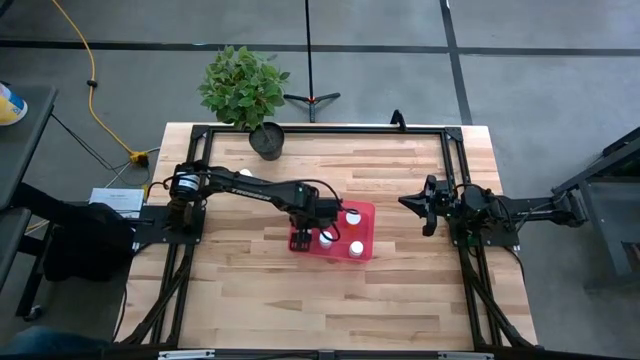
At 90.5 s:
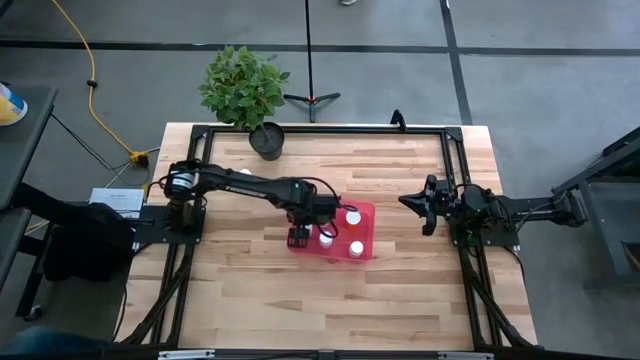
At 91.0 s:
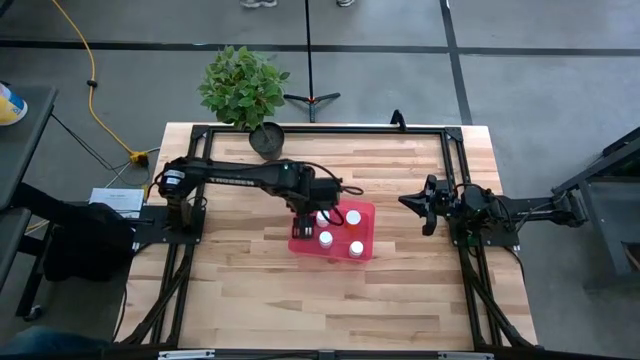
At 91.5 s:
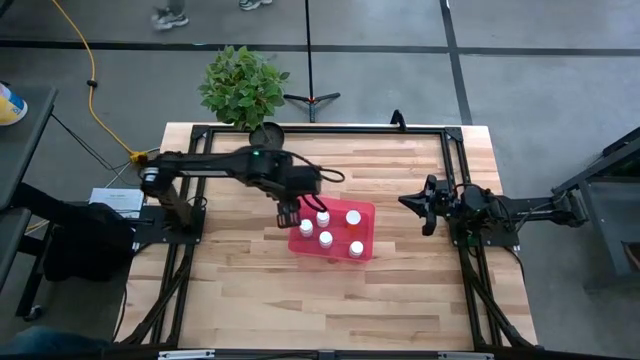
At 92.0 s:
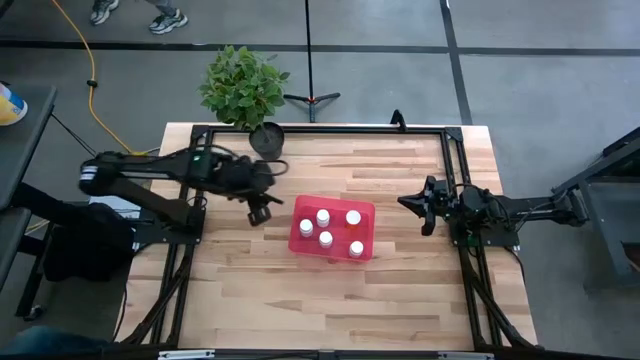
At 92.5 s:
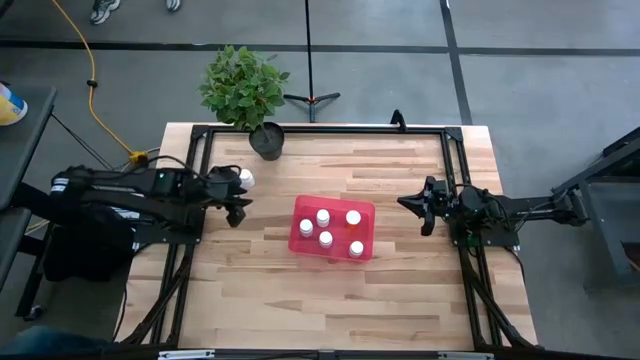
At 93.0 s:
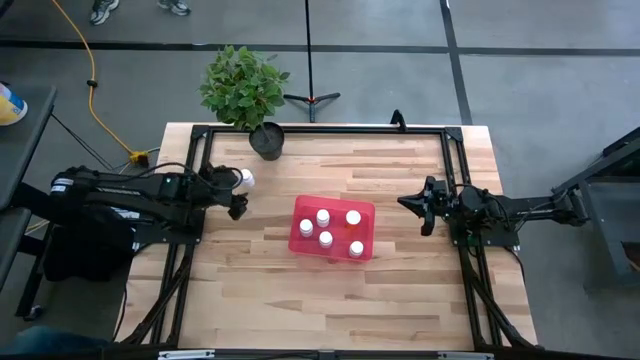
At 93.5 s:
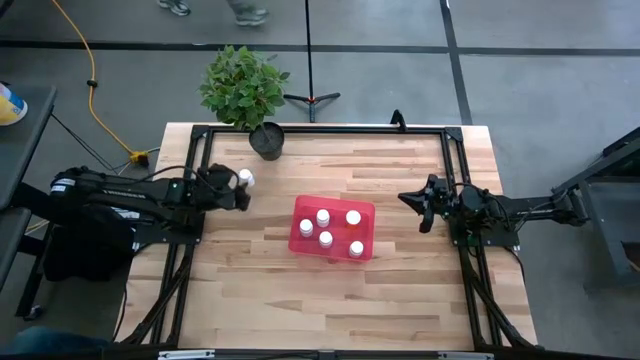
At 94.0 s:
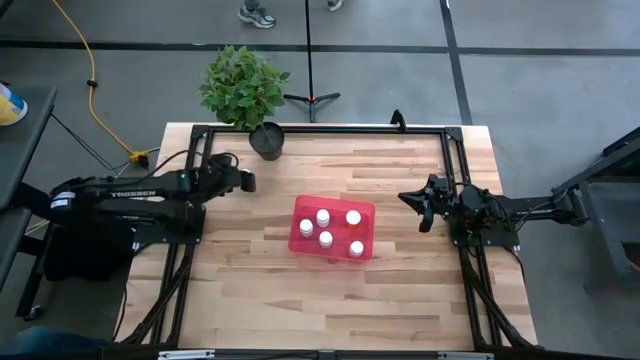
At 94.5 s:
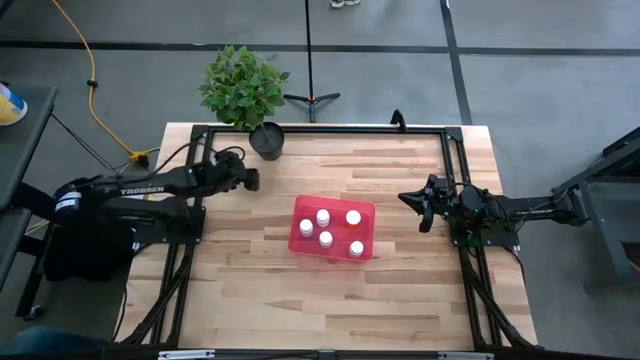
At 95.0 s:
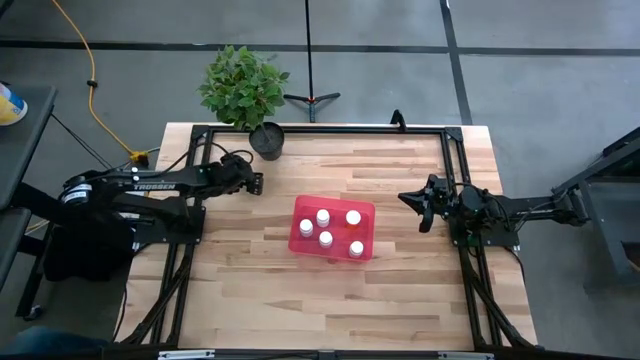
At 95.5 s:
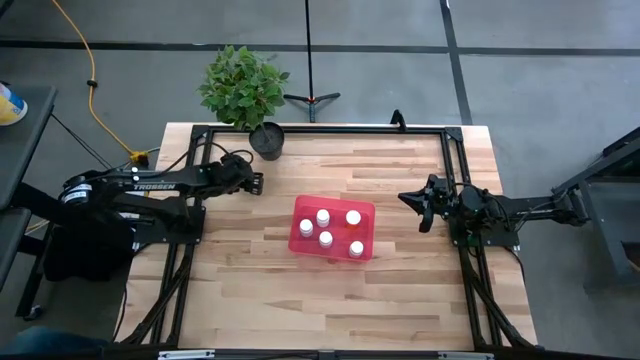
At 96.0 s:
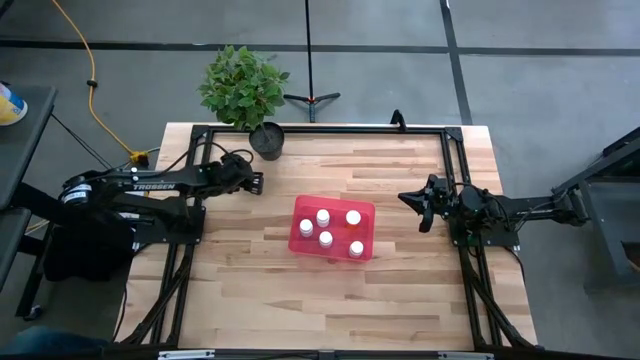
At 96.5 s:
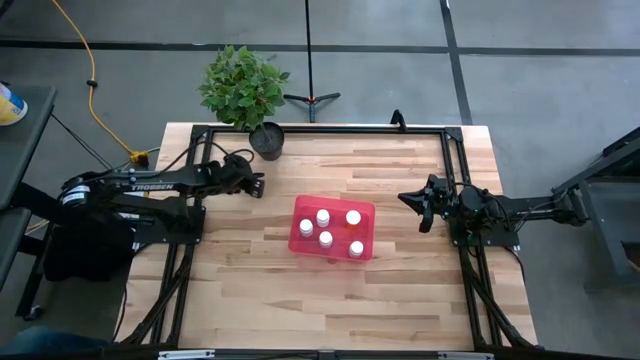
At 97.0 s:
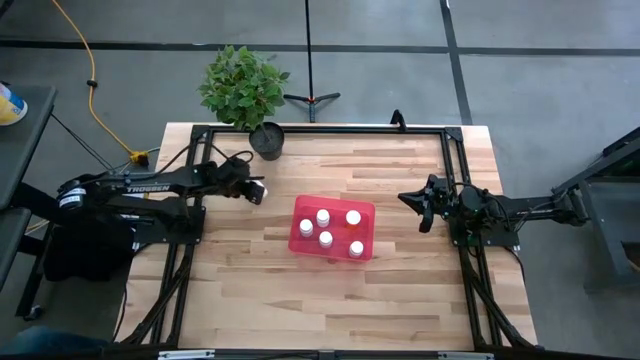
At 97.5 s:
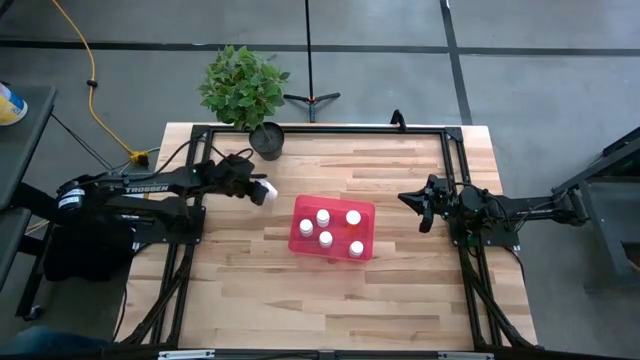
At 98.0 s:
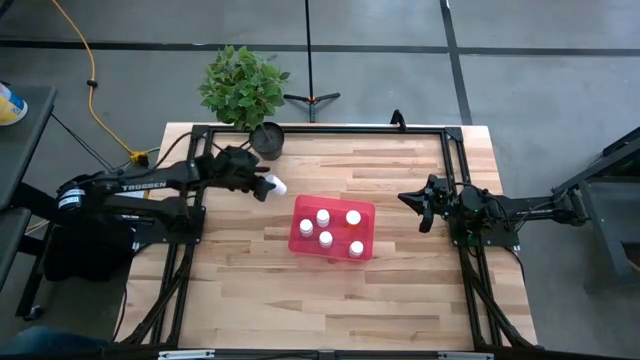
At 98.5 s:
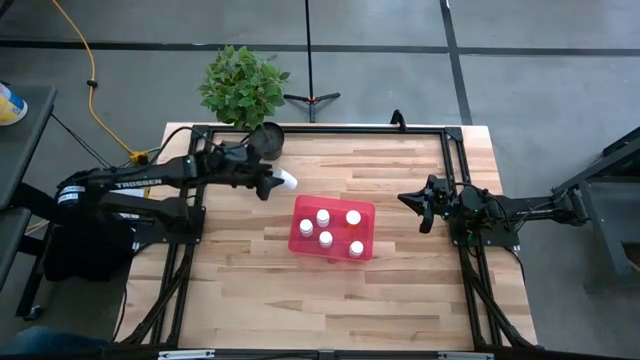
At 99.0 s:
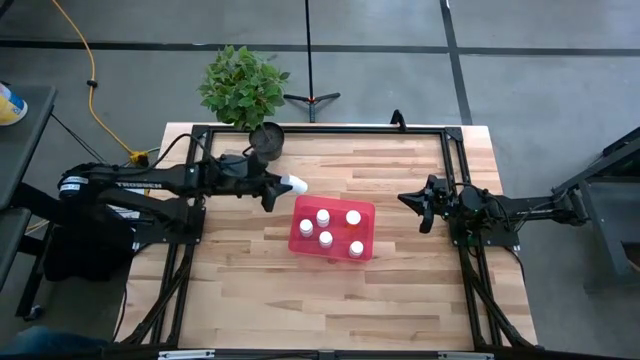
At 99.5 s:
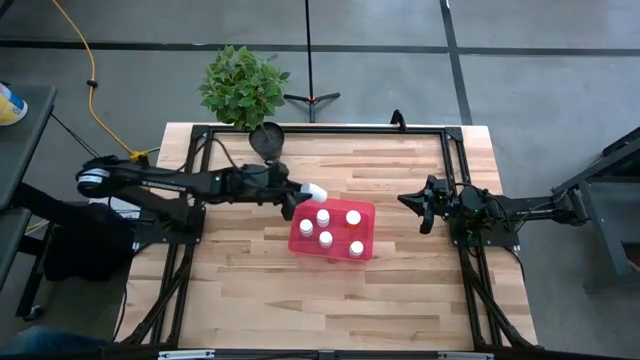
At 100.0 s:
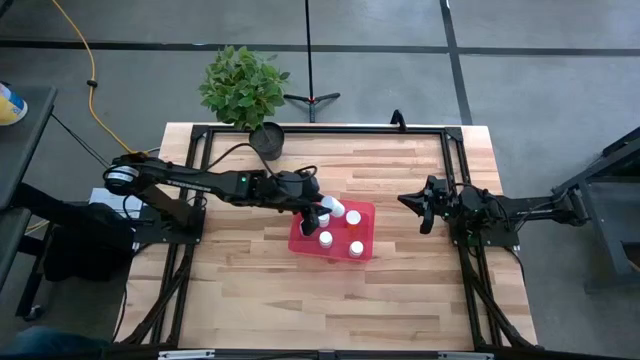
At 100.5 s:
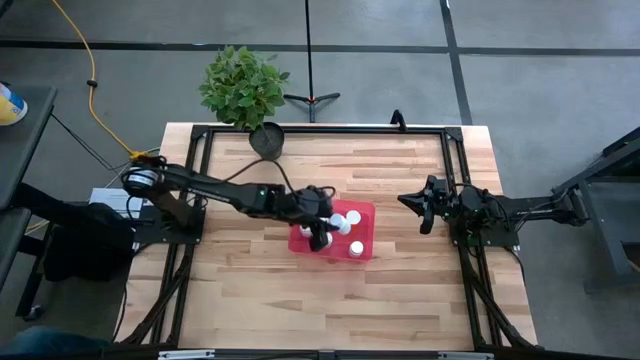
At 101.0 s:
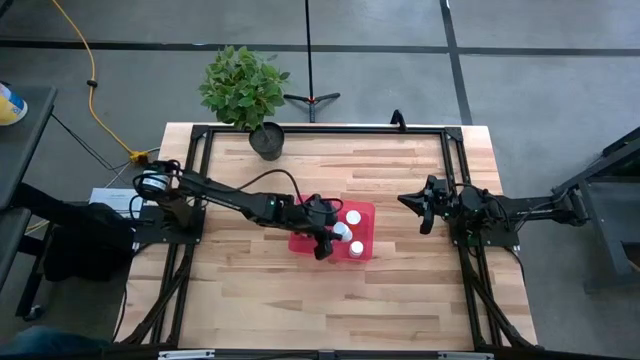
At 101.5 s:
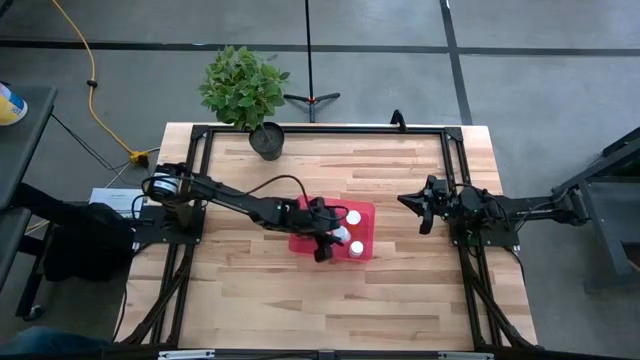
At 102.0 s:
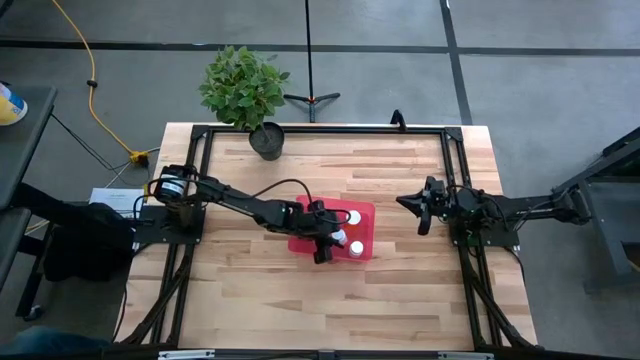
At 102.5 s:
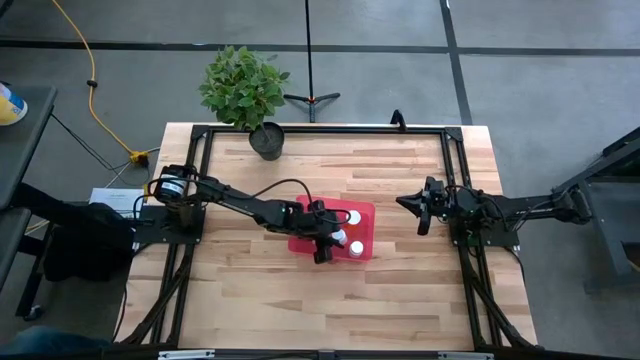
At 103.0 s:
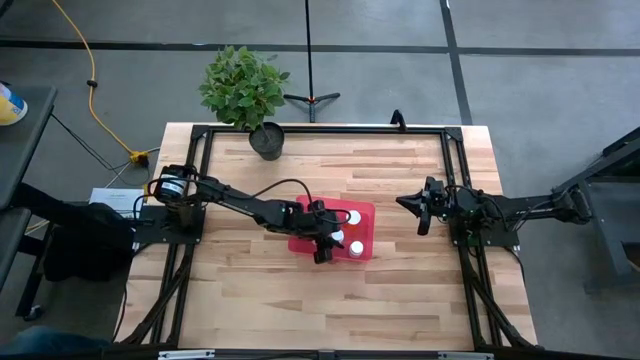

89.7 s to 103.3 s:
Task: Pick and place pill bottles into a basket
Put the white medicine bottle into the bin

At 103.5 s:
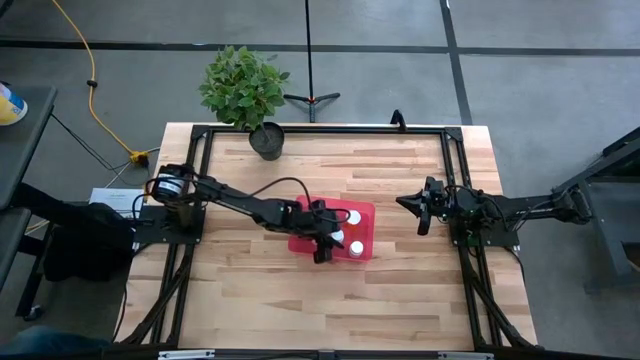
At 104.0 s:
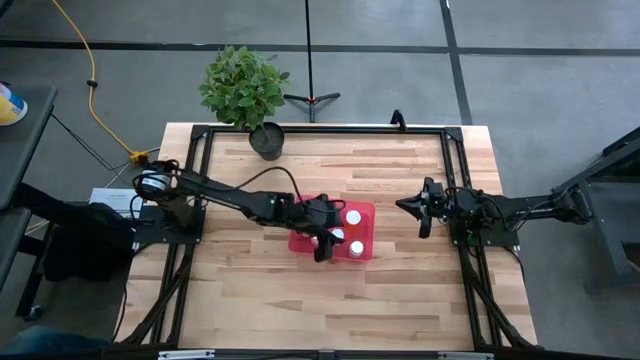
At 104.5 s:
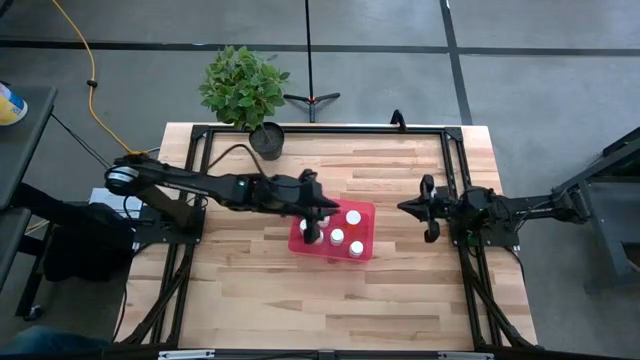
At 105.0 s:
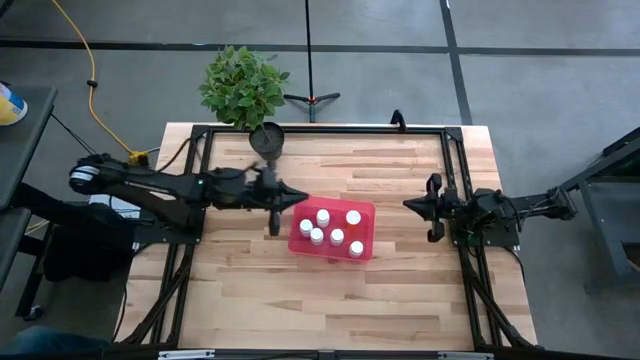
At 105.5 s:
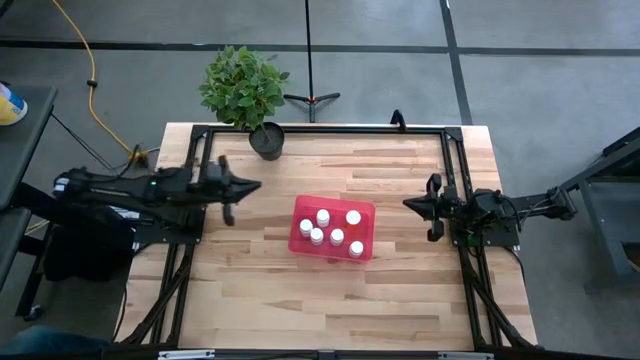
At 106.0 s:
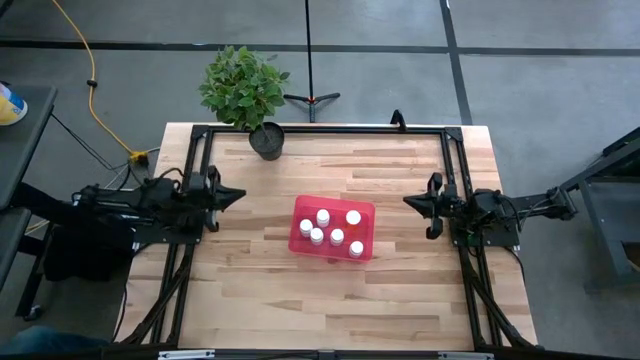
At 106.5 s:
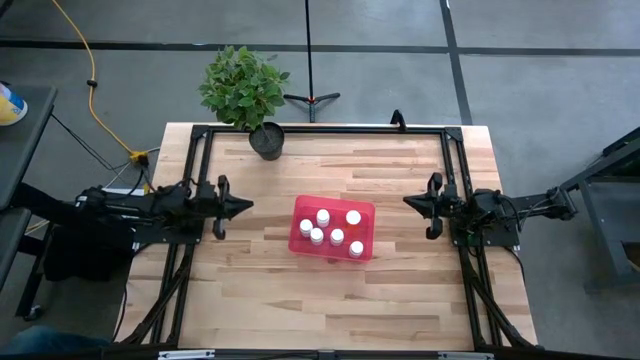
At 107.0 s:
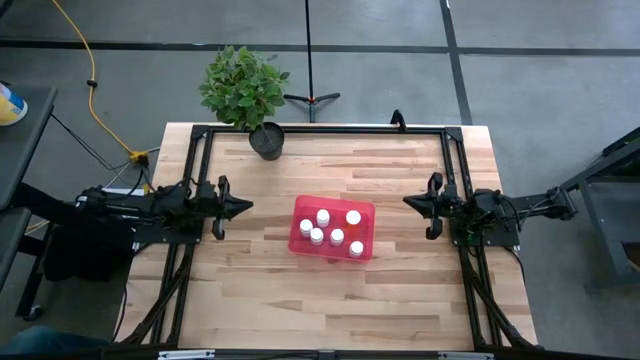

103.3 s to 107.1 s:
Return to Home Position

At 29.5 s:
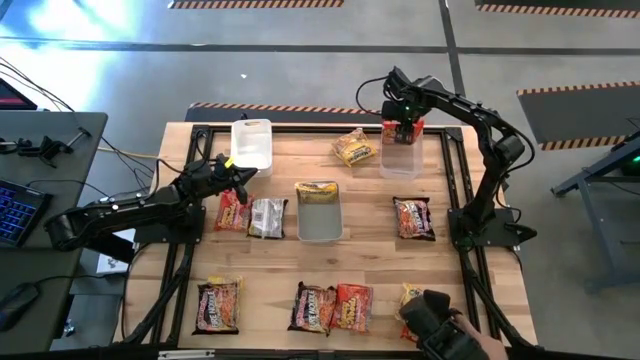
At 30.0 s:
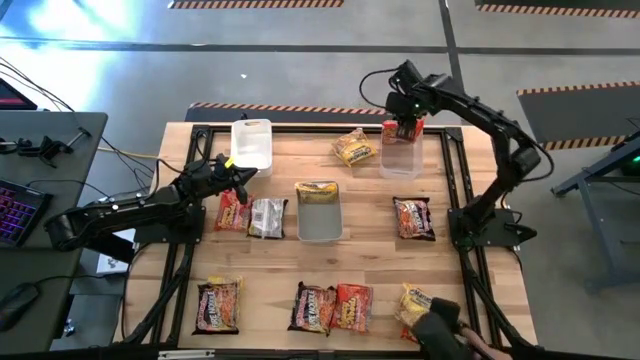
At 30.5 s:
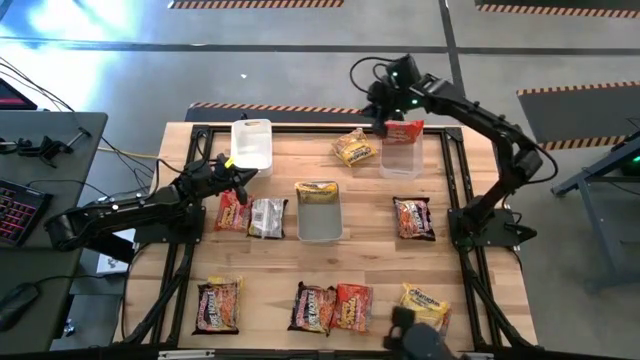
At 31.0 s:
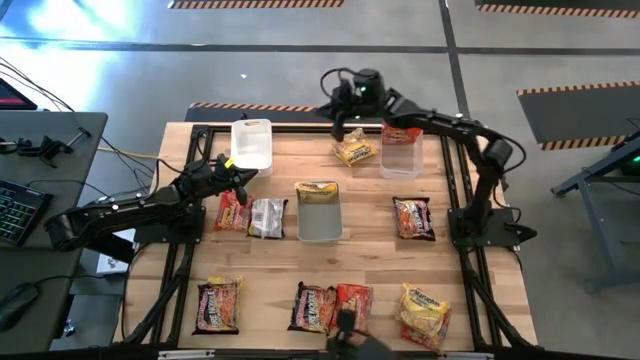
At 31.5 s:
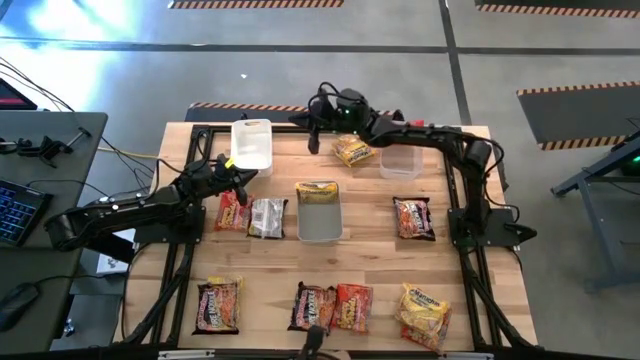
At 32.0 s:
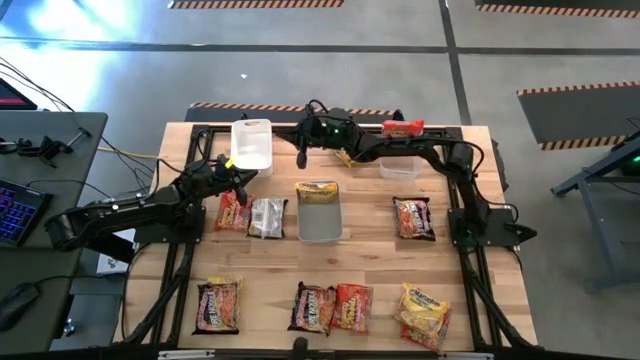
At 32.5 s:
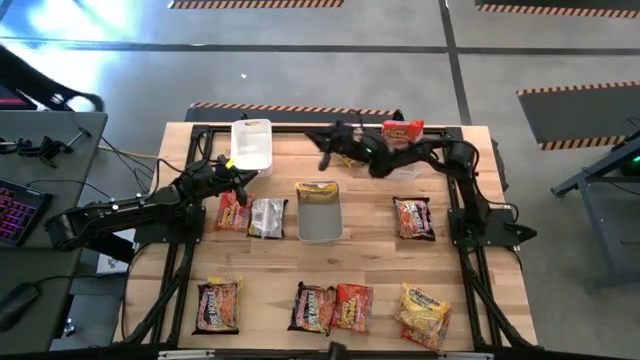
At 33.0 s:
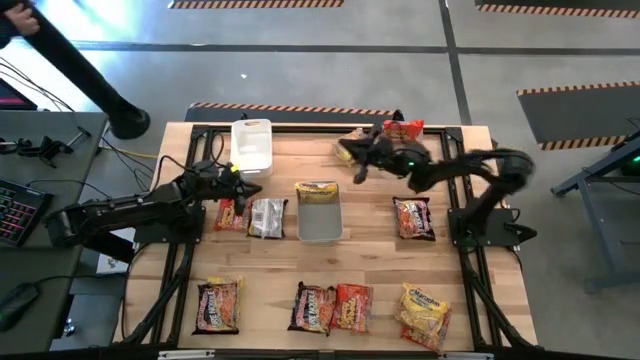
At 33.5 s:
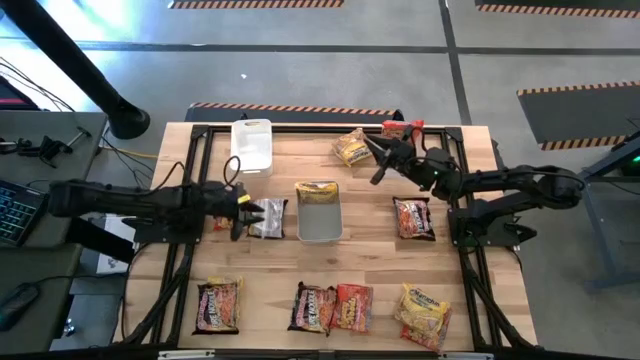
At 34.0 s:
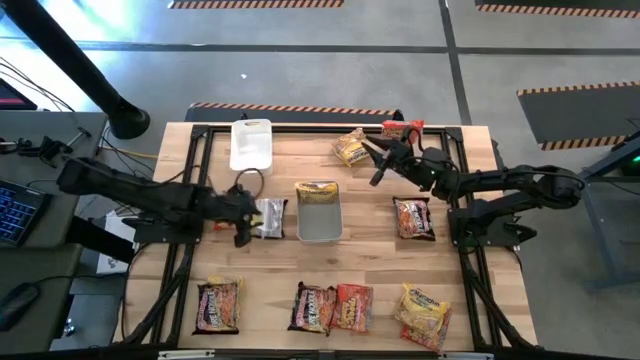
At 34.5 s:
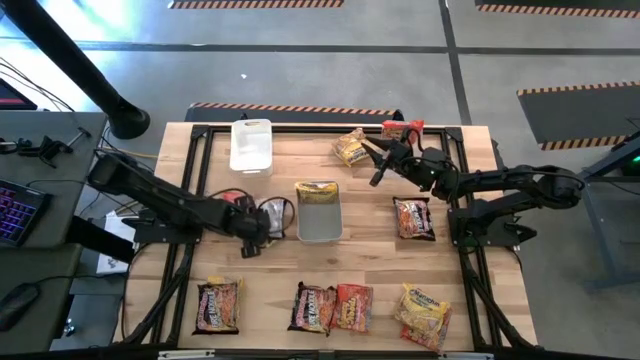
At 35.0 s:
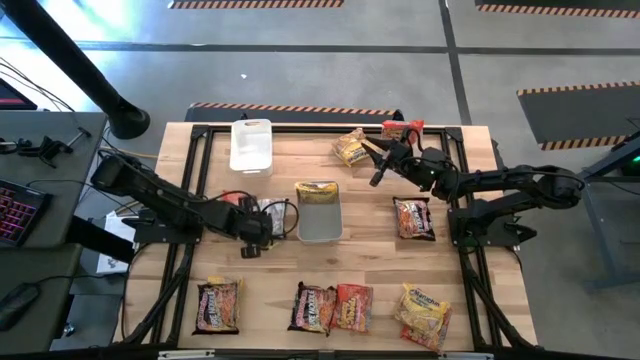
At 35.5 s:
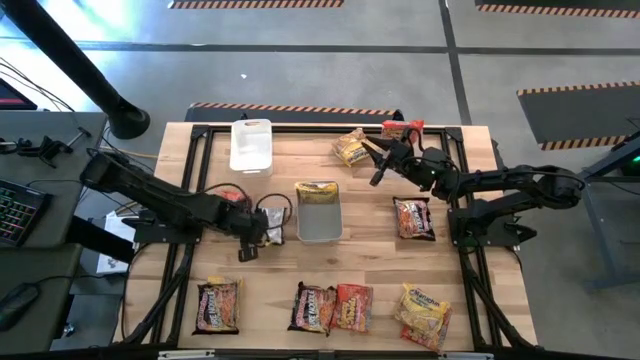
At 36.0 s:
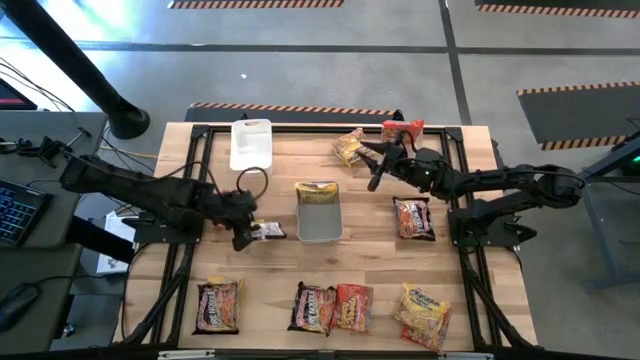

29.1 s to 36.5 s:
Task: Sort Maruchan noodles
Put the black noodle pack into the white bin
